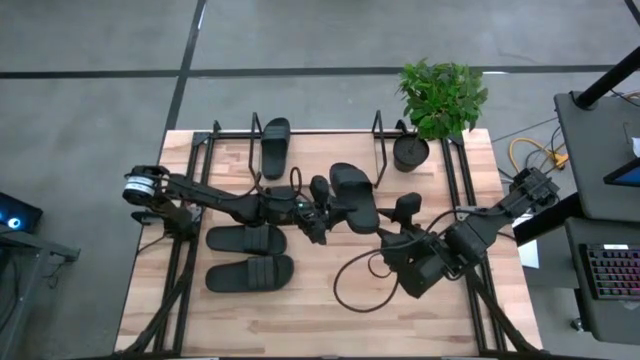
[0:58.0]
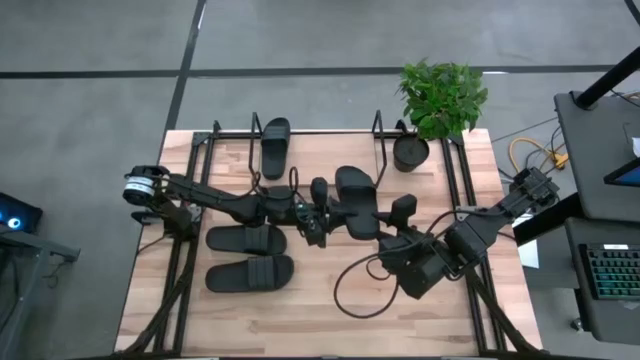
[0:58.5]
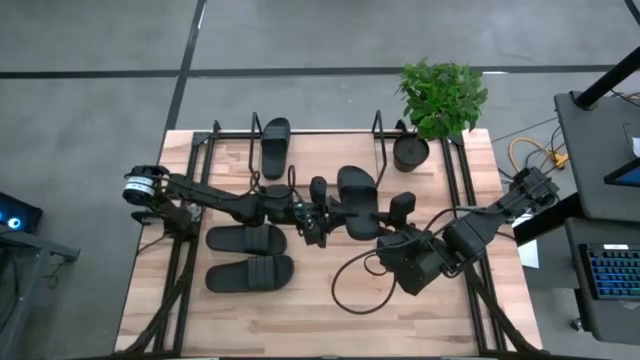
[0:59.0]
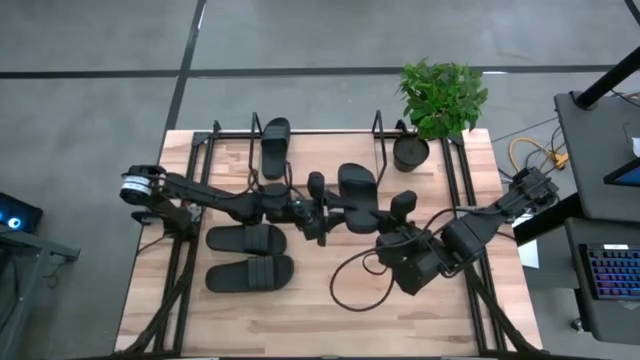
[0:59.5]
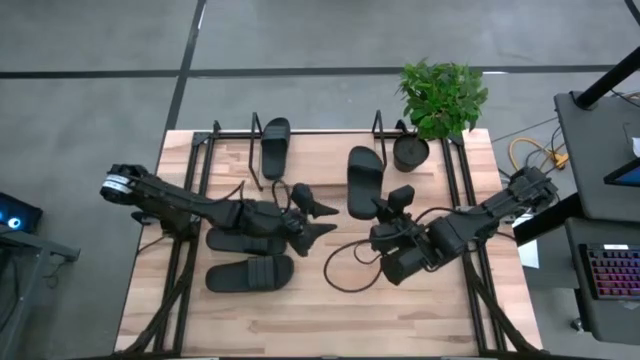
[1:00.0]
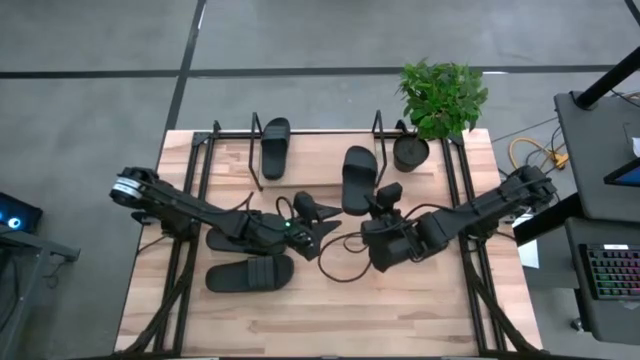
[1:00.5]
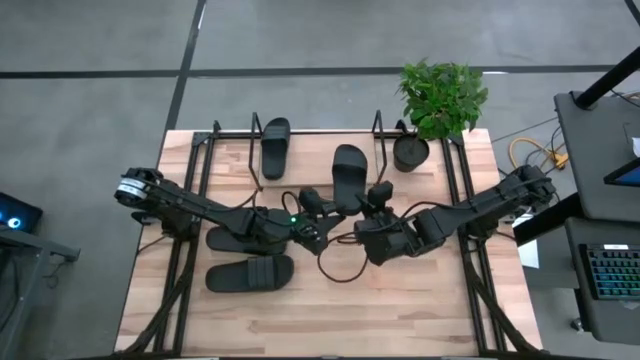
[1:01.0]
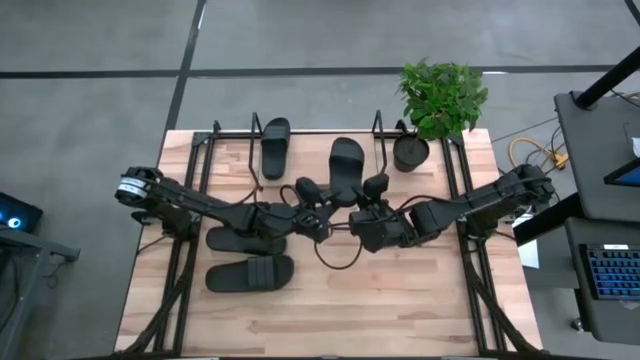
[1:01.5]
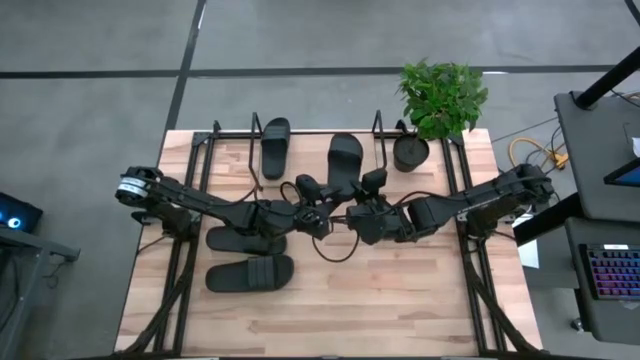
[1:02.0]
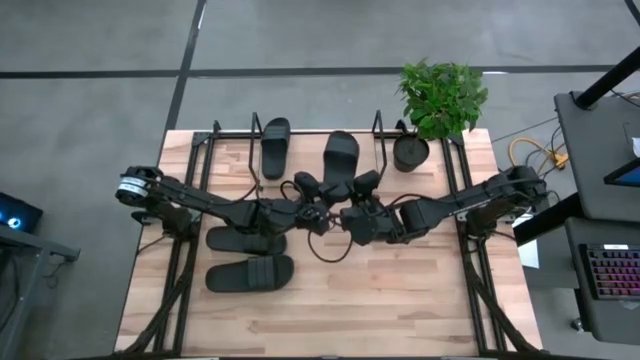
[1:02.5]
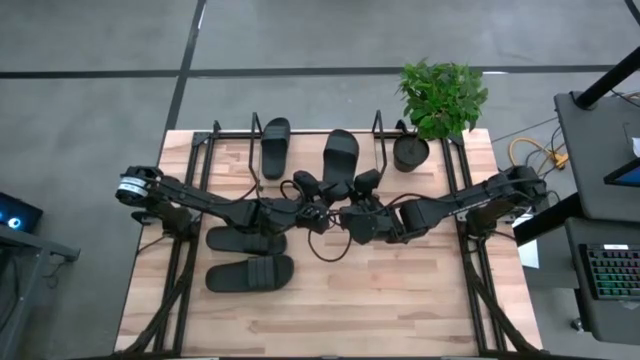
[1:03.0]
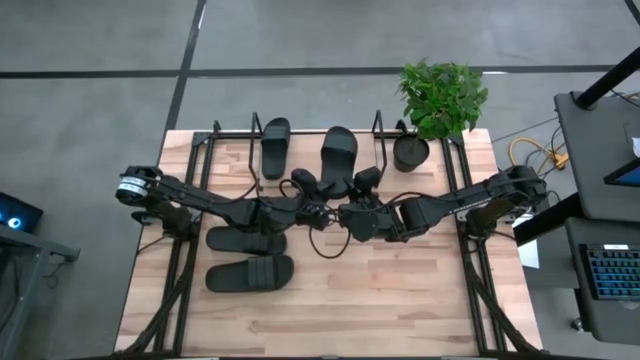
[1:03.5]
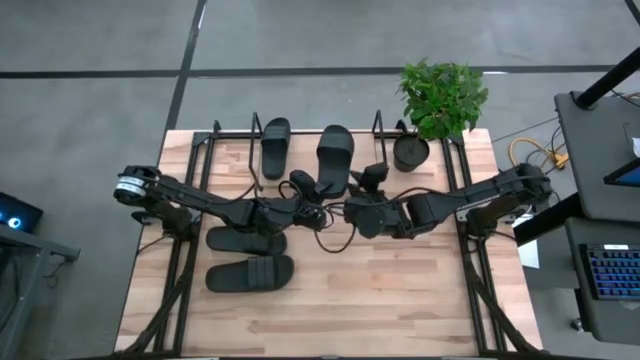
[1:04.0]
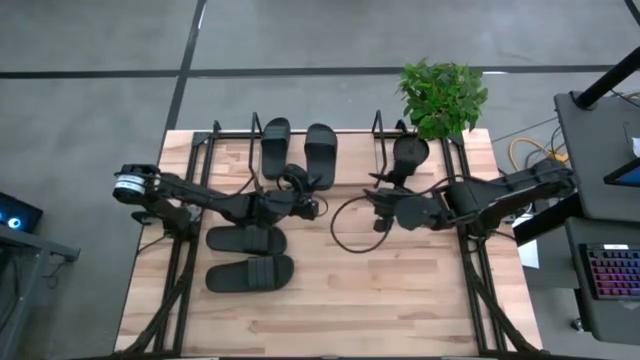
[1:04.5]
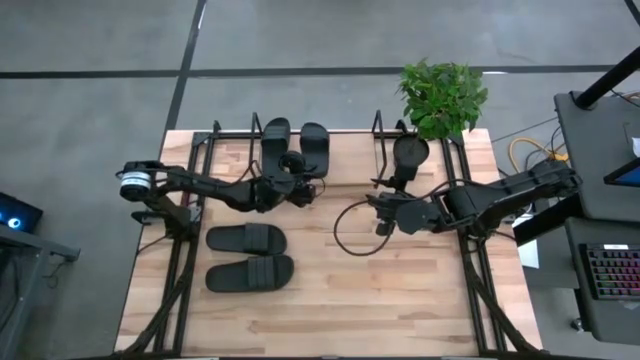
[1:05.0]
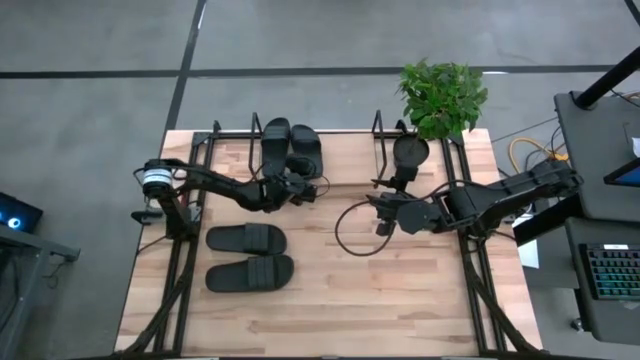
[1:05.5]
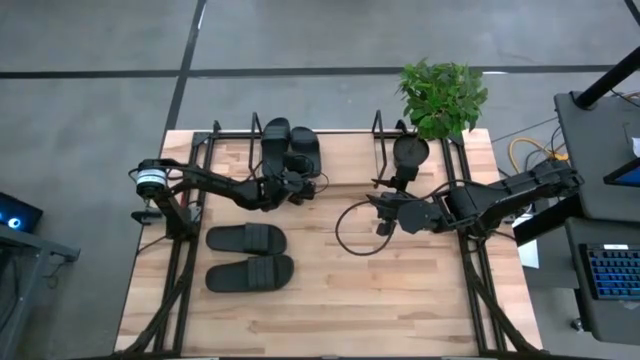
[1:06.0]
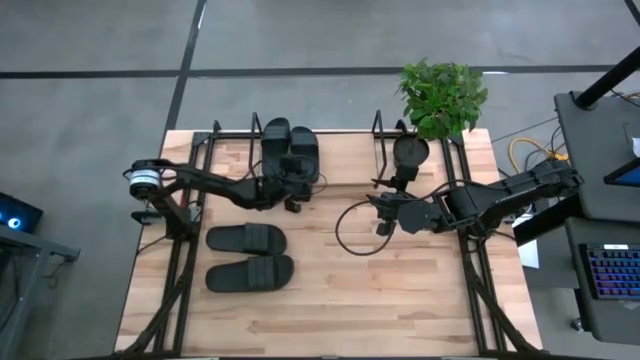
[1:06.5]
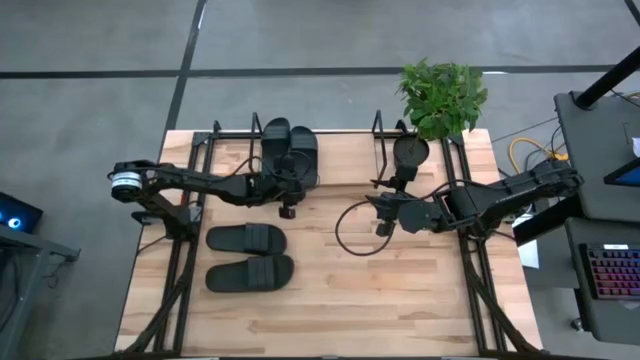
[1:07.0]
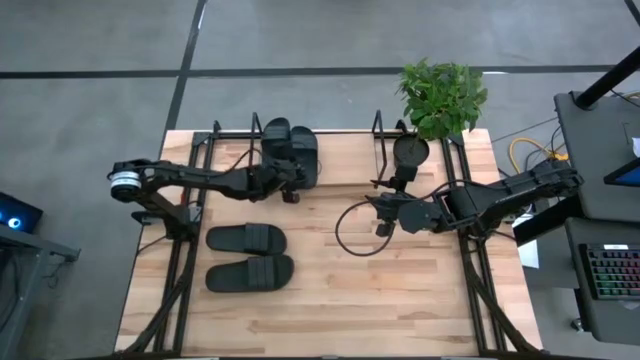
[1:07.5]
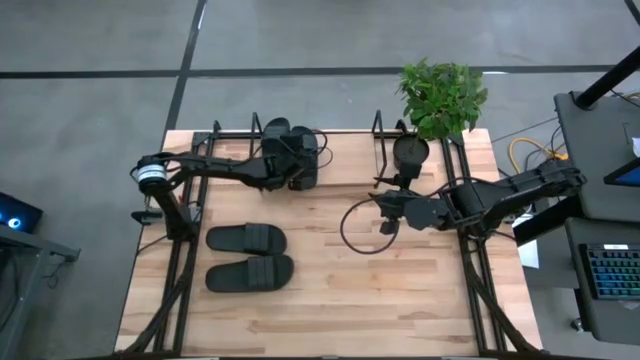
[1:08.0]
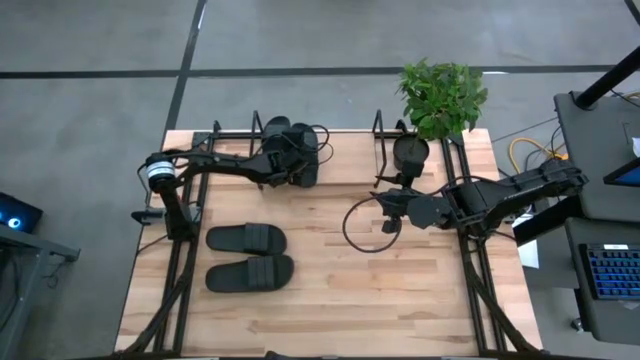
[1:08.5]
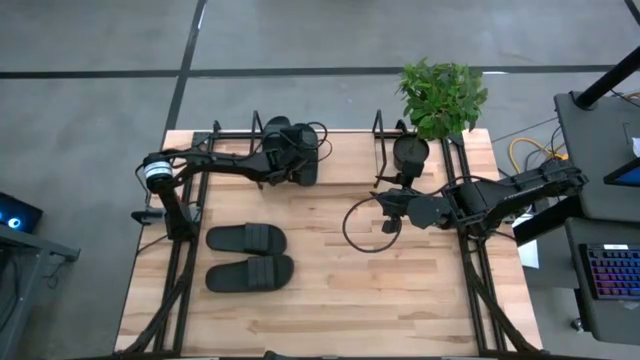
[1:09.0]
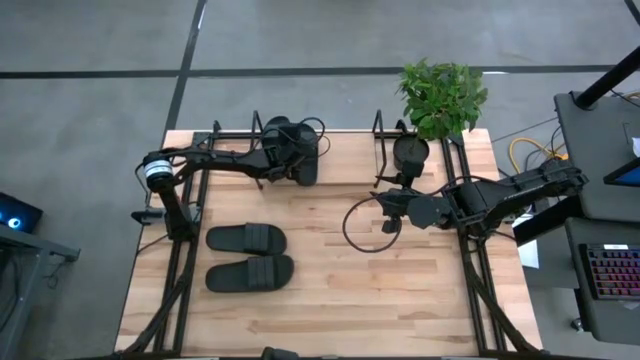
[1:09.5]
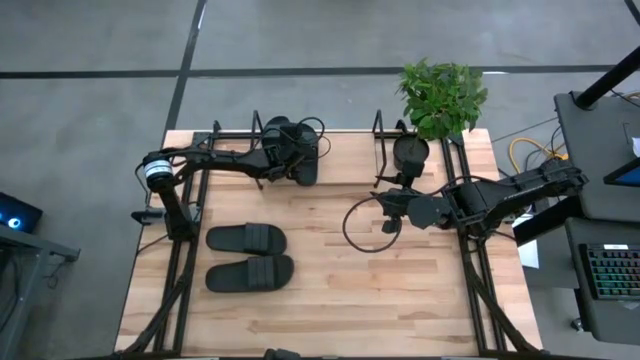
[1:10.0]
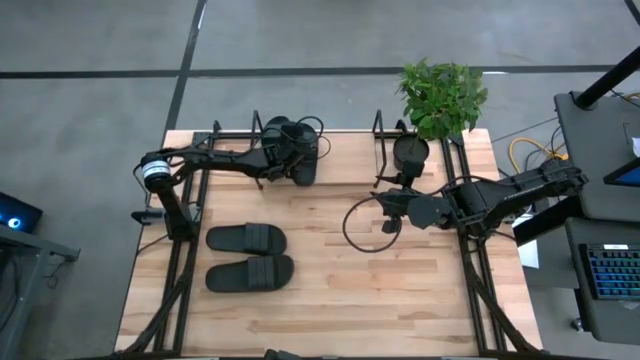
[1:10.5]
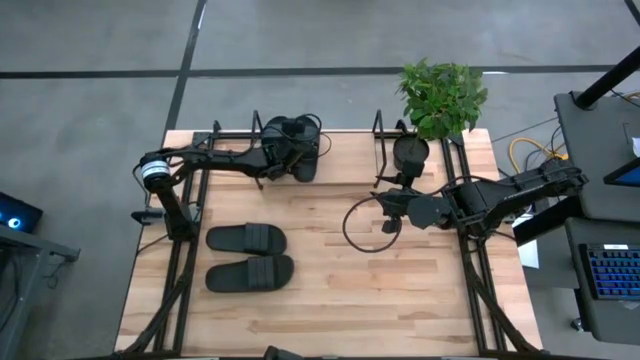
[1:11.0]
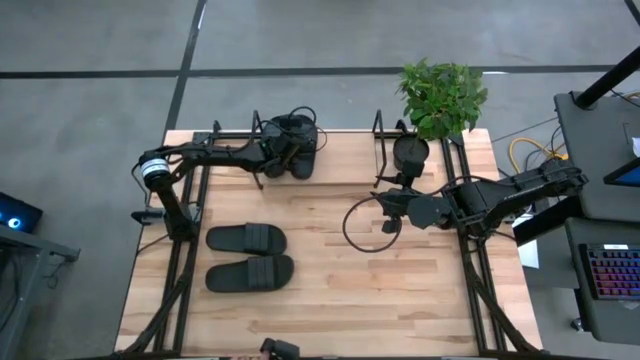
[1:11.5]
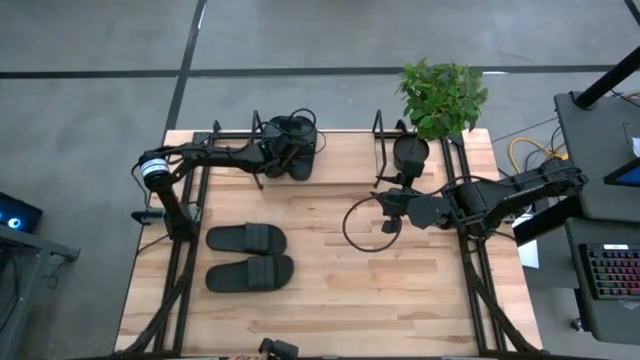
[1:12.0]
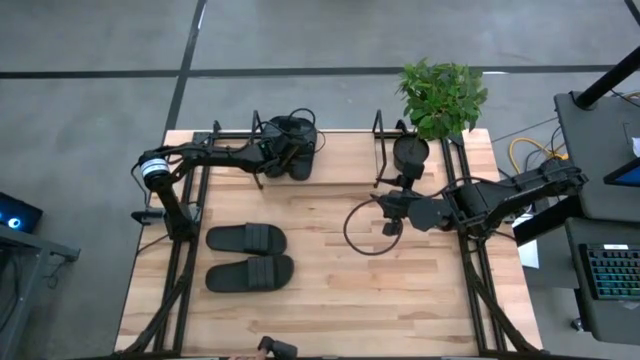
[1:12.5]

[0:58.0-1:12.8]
Task: Pick and place slides into the shelf
Put the black slide on the shelf

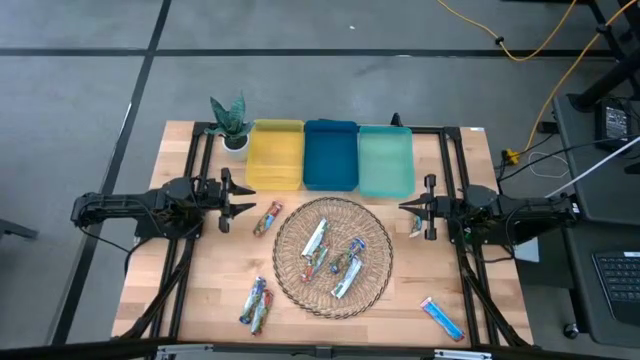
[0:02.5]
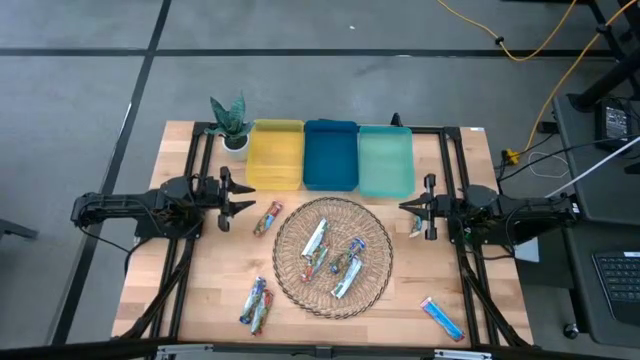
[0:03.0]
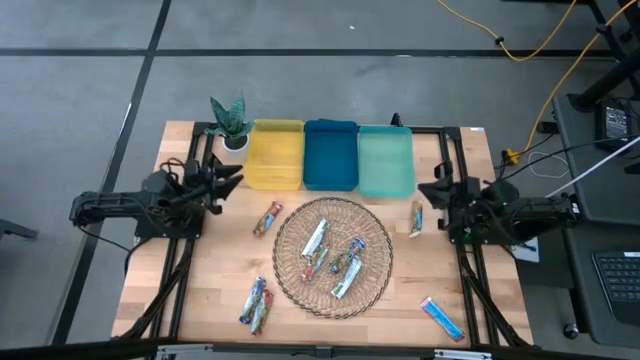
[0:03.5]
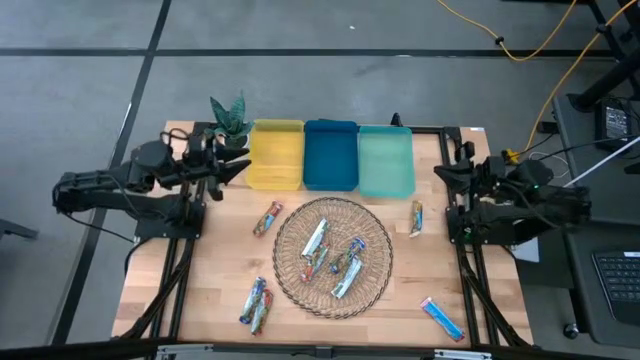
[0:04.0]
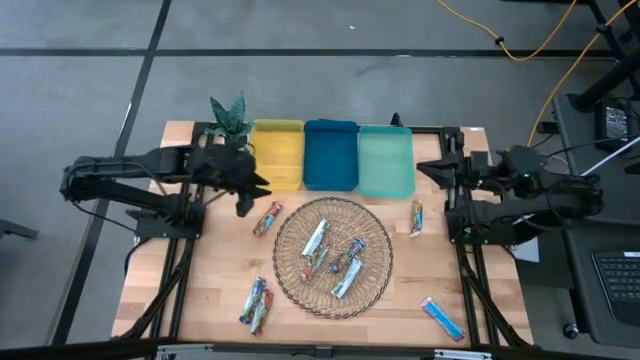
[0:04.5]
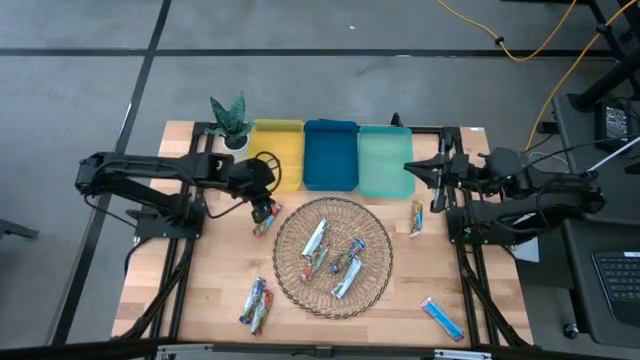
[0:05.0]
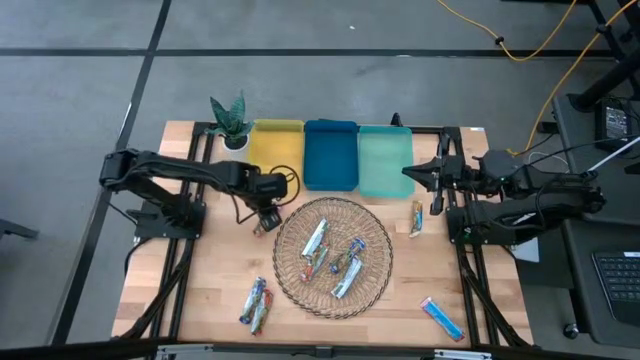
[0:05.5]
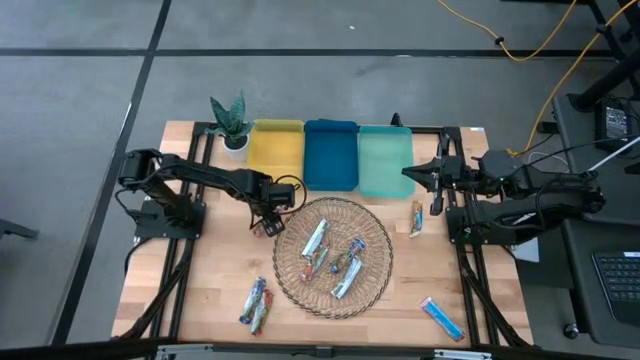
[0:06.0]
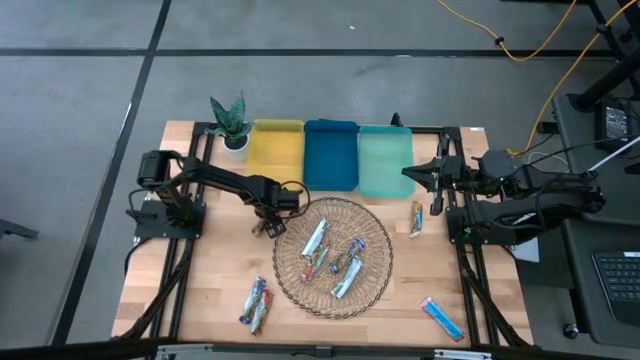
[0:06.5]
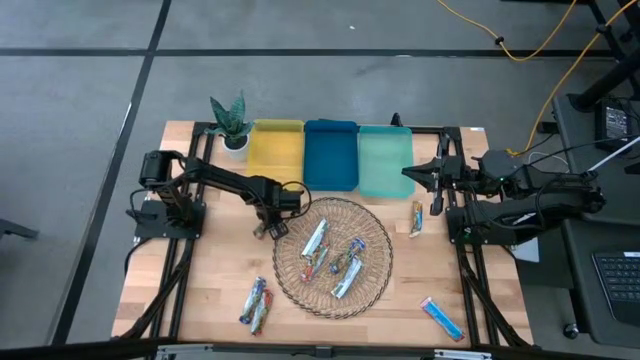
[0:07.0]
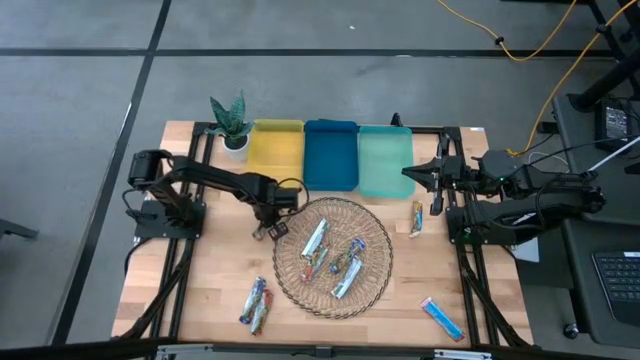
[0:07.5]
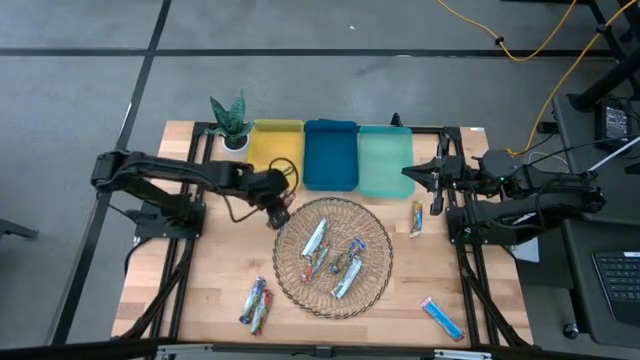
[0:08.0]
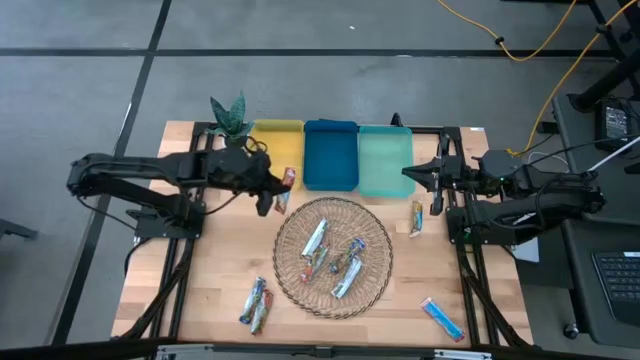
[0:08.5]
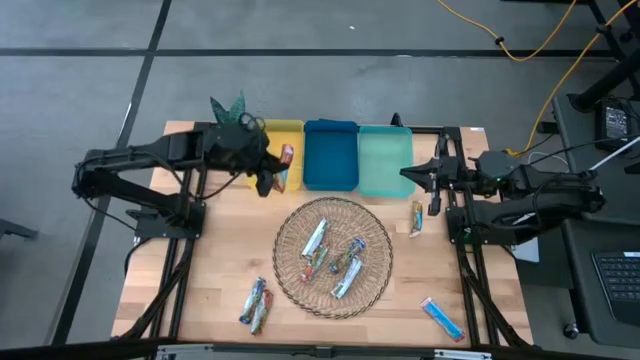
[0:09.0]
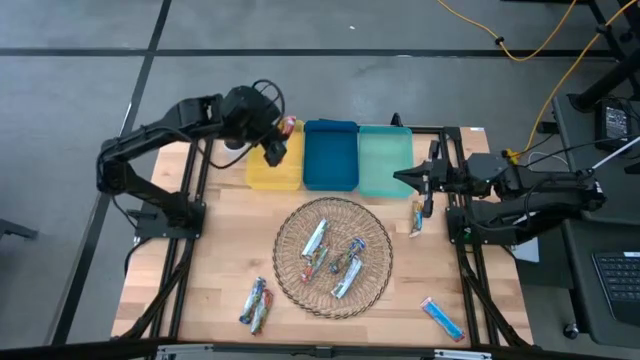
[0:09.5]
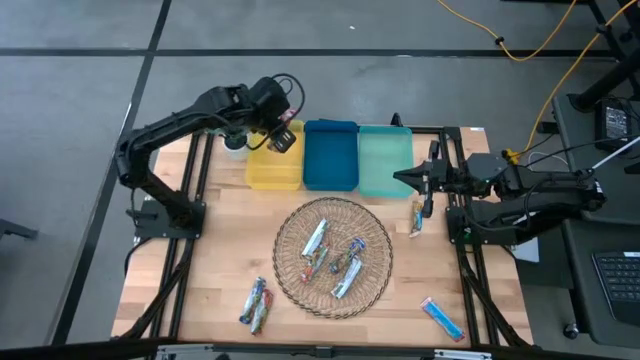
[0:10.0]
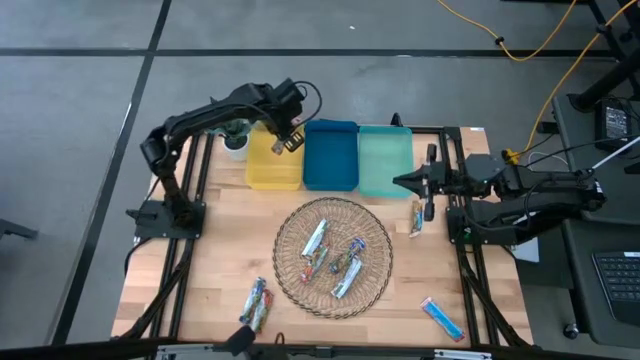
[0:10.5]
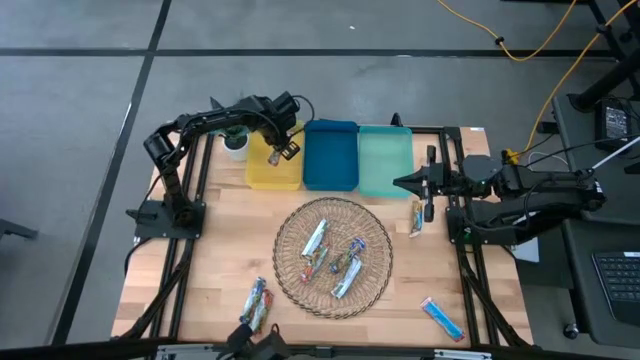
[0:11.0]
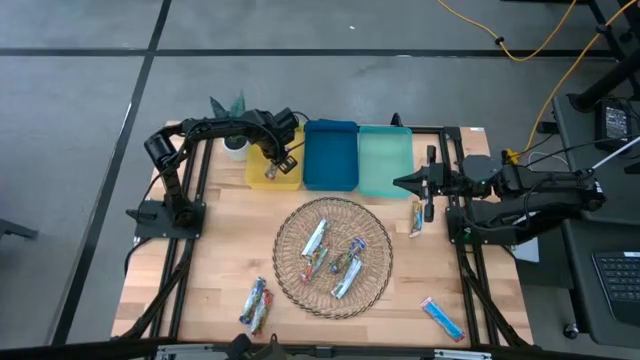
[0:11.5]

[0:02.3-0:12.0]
Task: Pick and place Granola Bars by type
Put the red granola bar into the yellow bin
